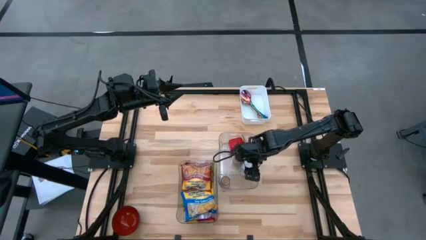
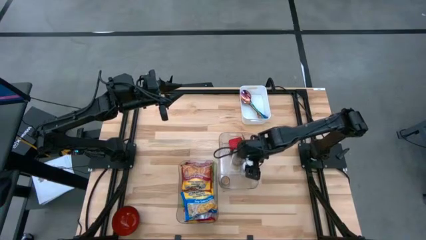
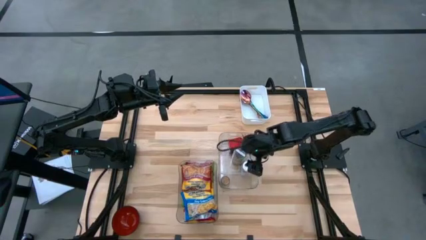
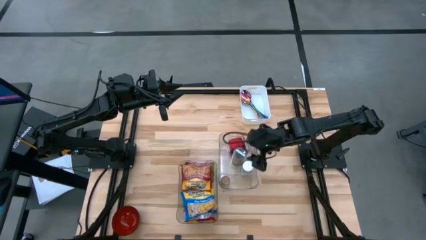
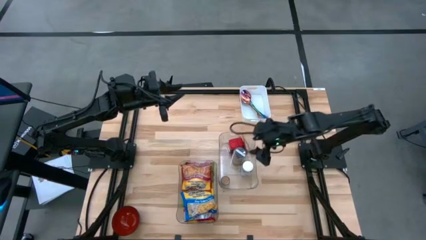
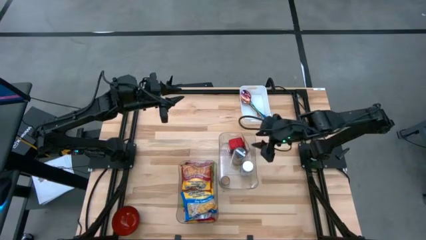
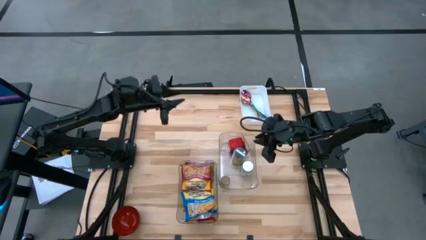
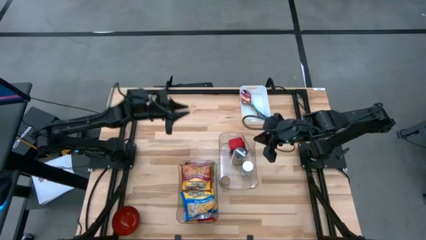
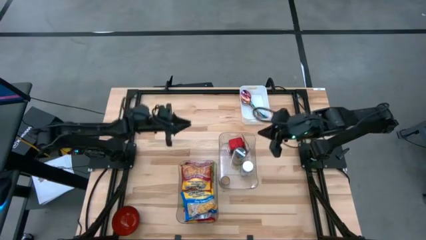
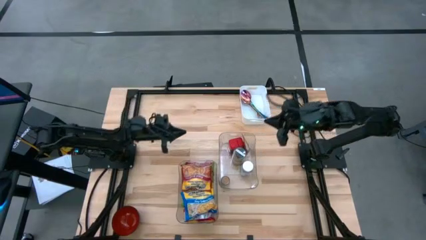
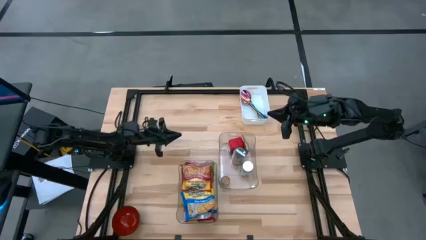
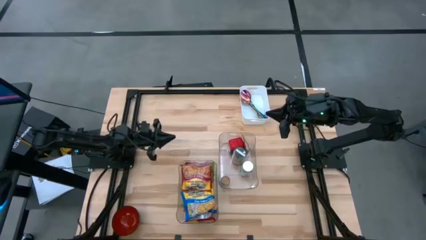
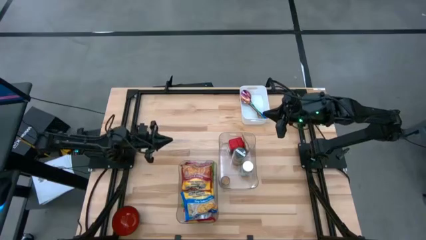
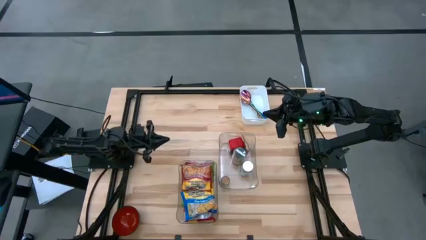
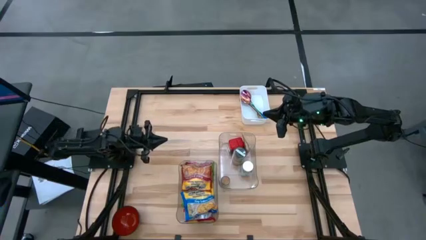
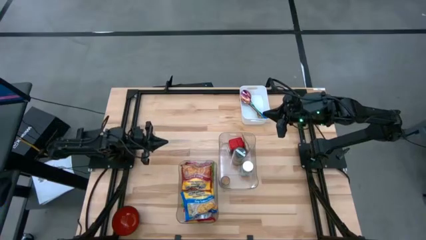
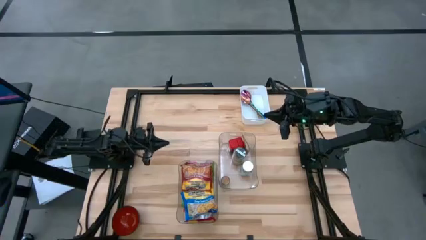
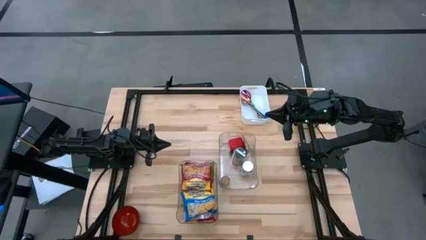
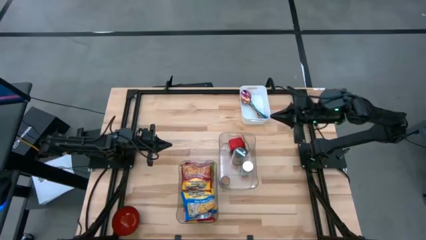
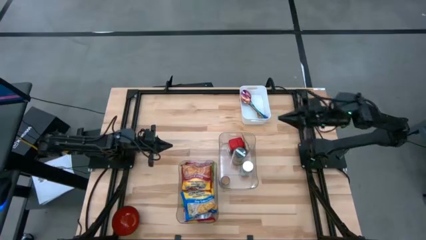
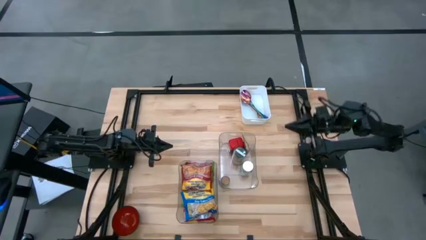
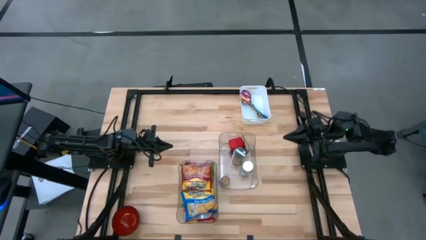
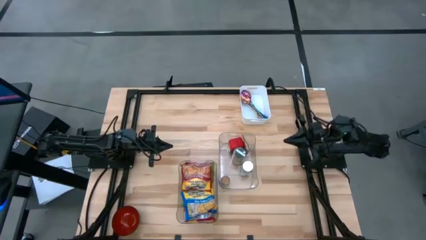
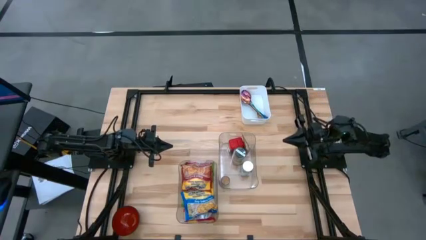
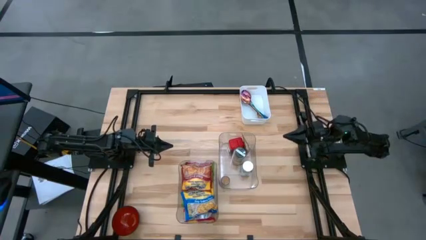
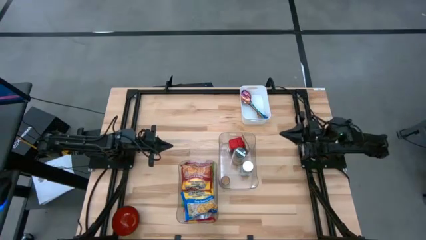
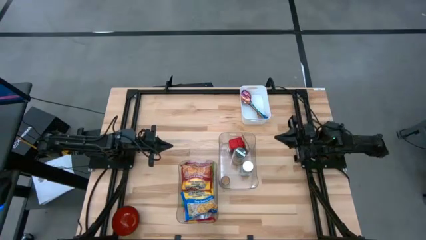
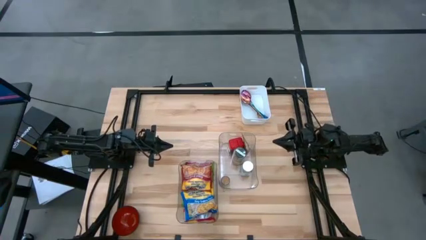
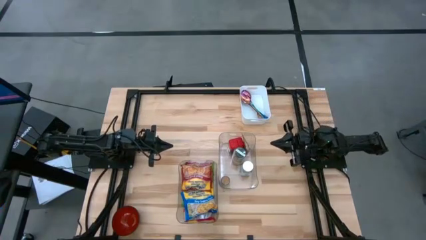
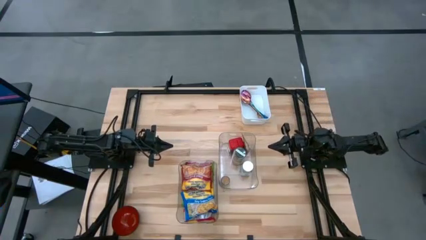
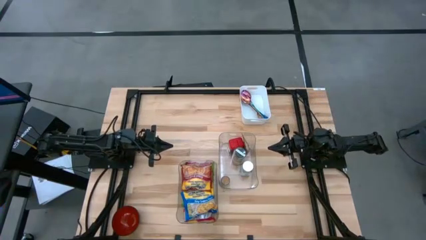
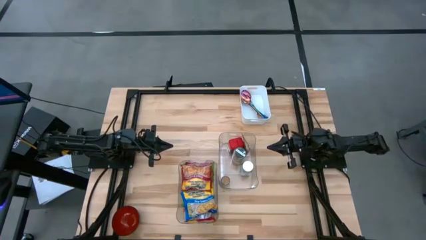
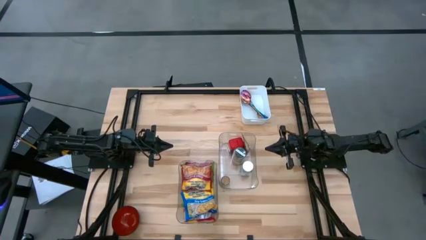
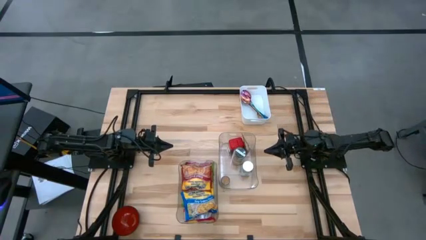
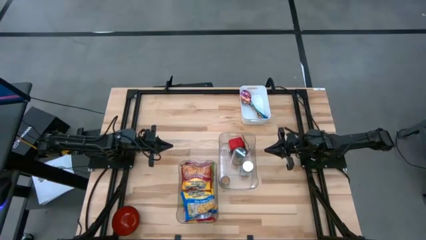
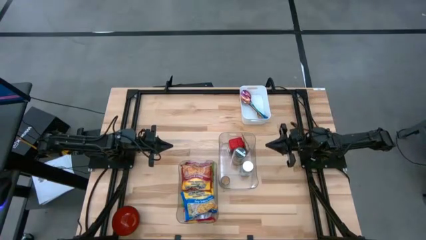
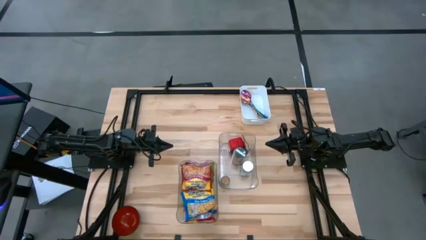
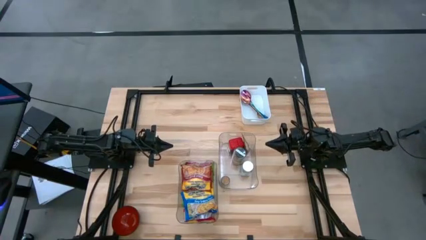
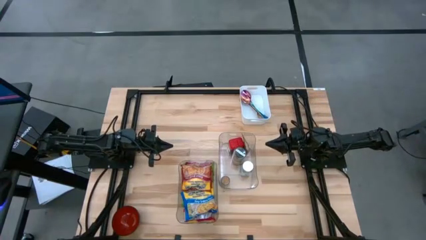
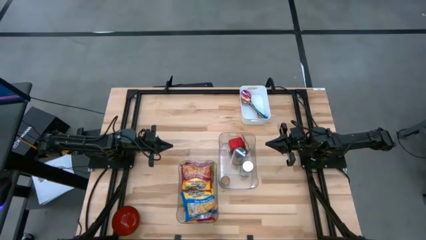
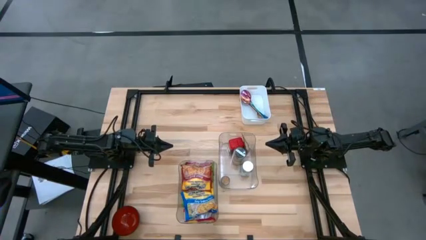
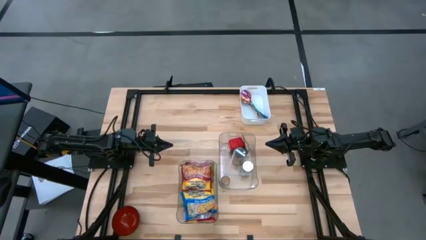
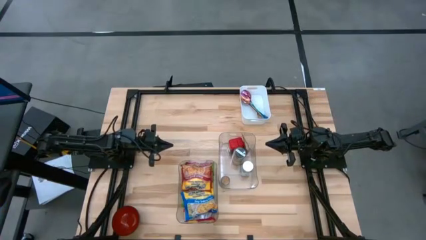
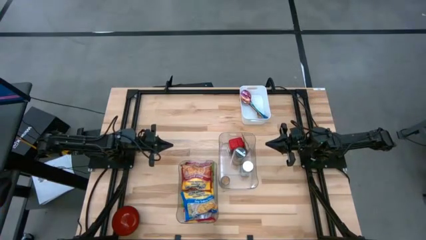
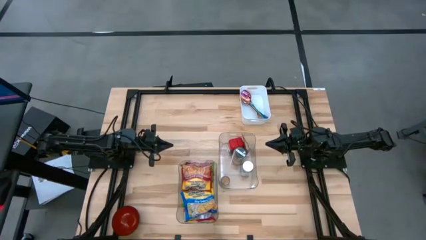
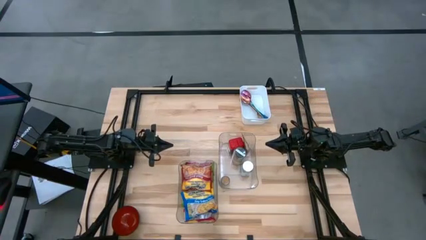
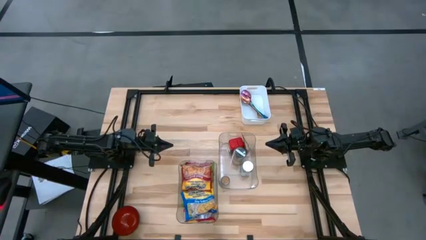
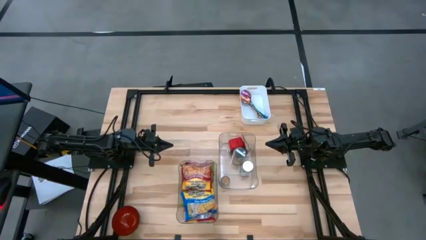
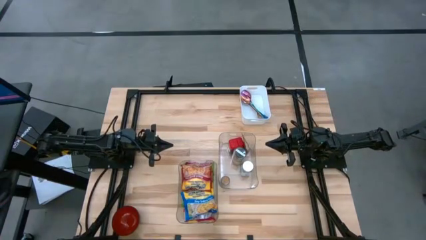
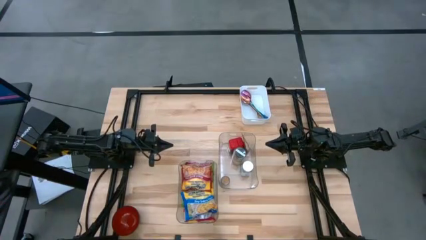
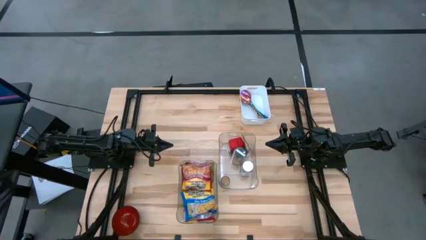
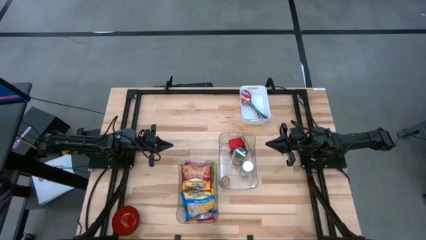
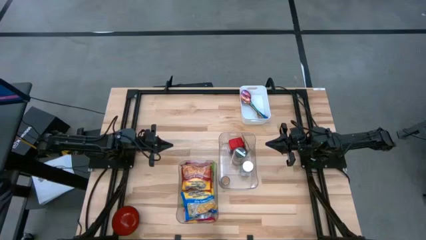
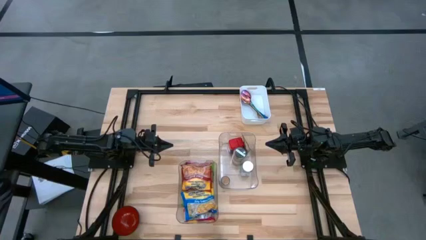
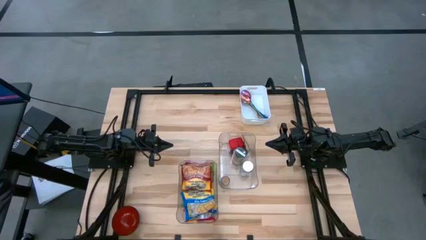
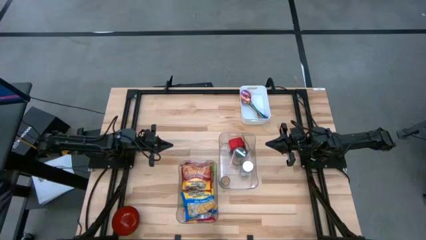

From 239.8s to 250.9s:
Task: Pick & Place Food Item
Return to Home Position

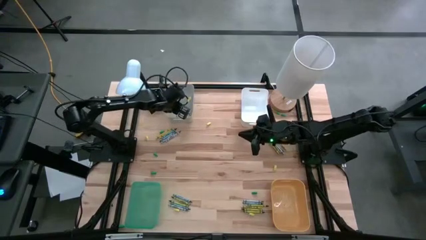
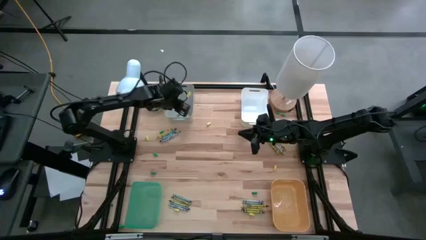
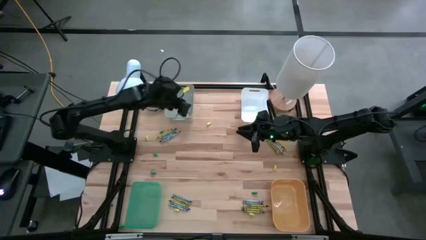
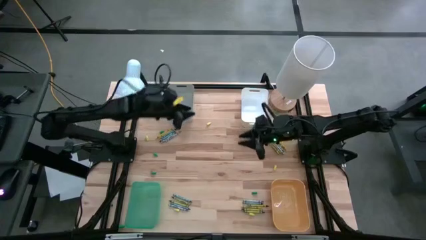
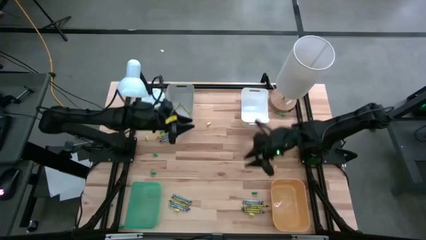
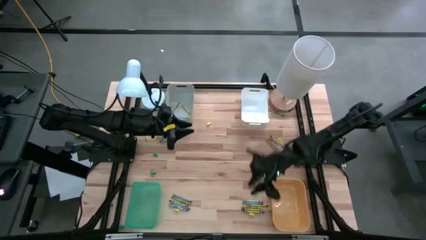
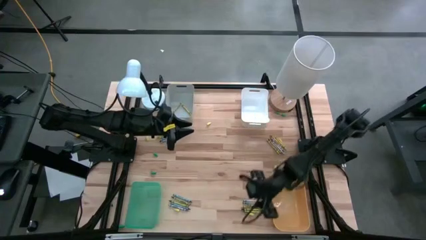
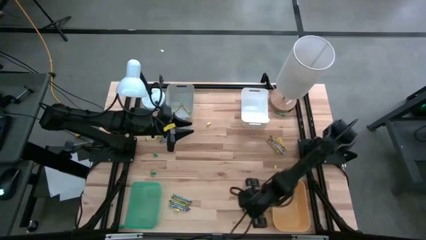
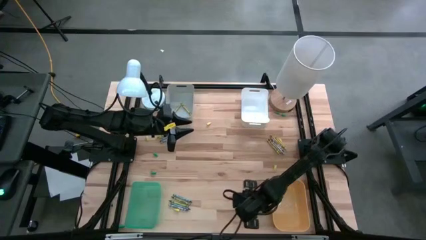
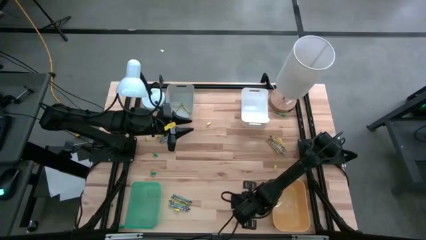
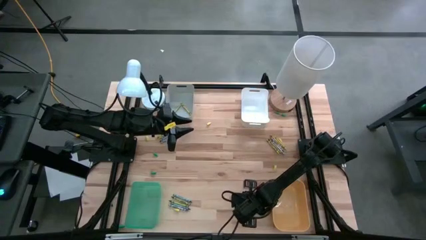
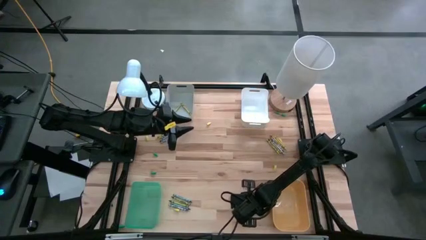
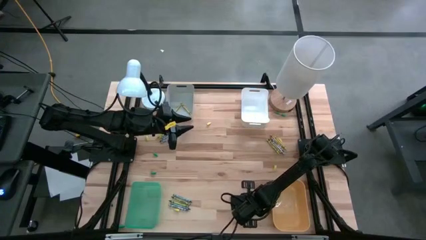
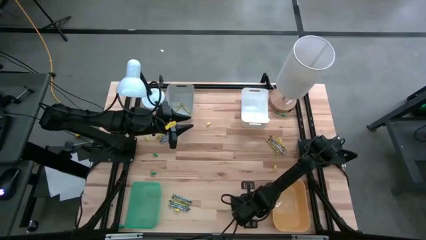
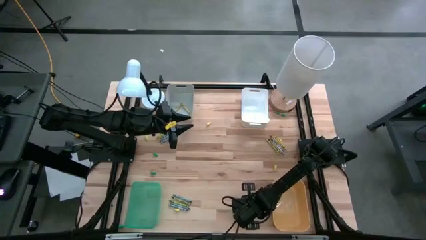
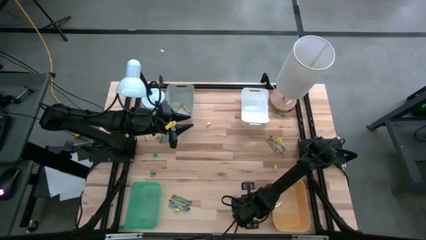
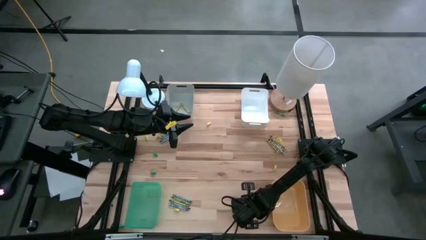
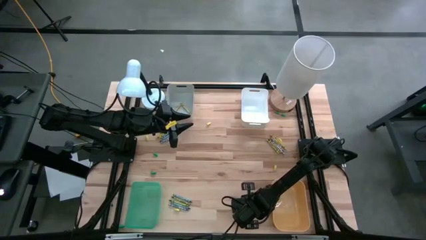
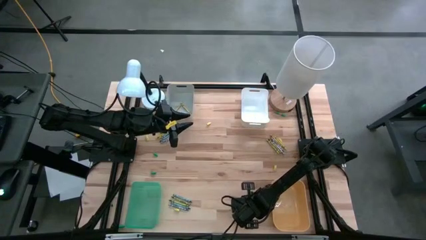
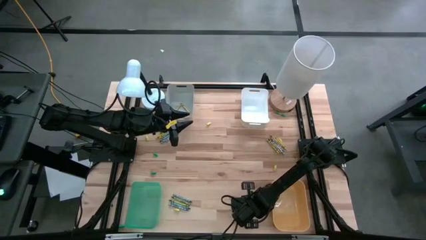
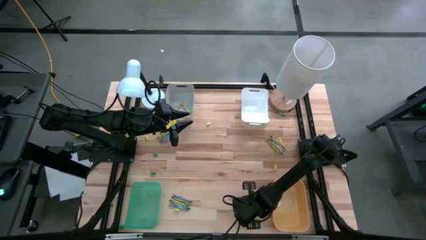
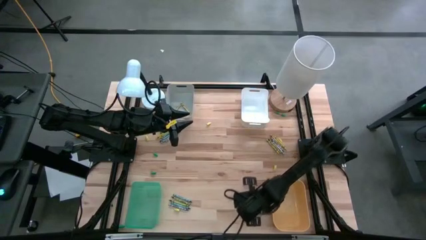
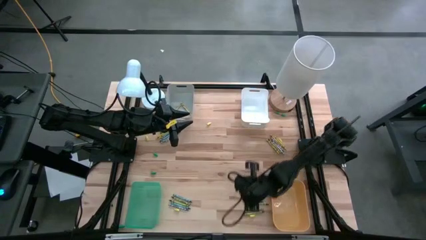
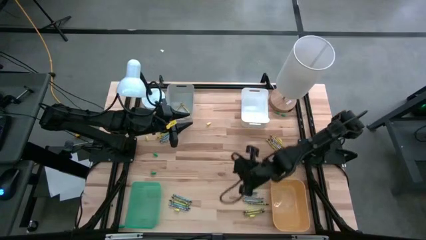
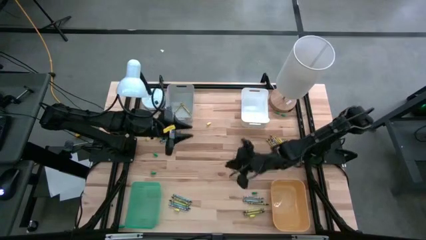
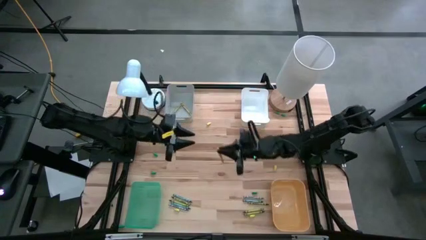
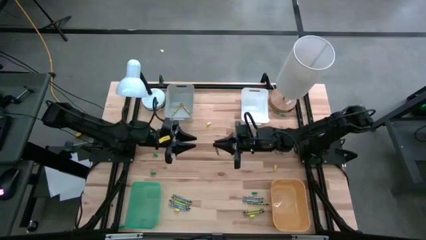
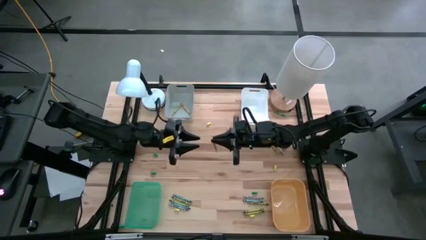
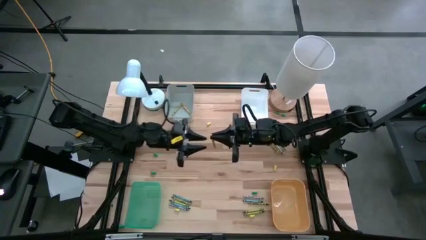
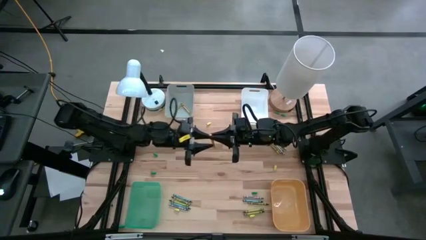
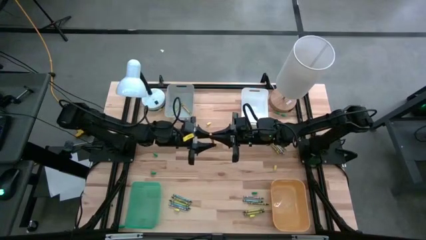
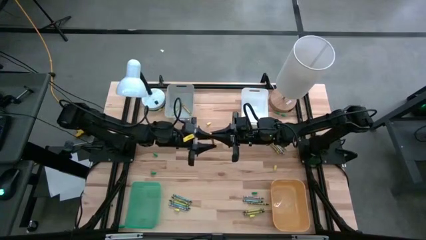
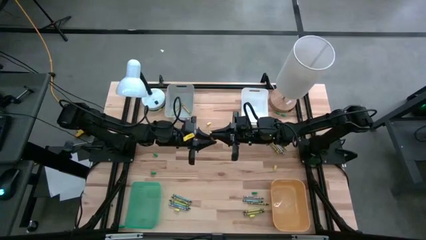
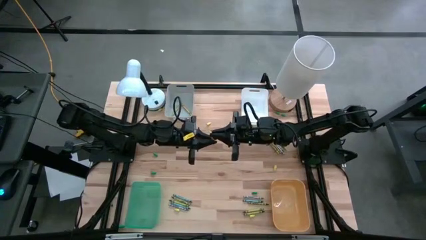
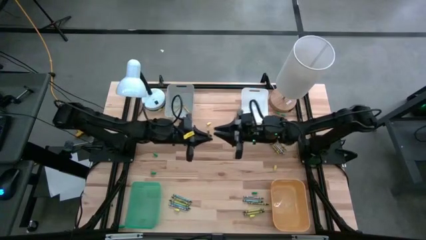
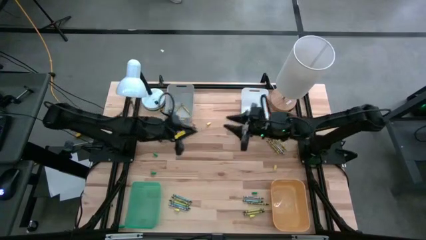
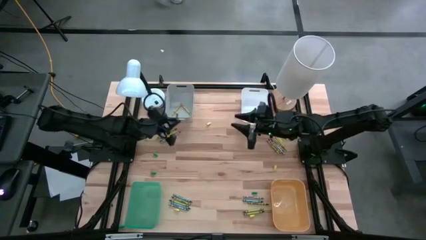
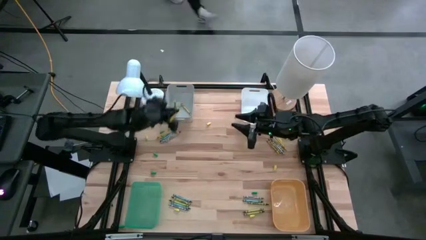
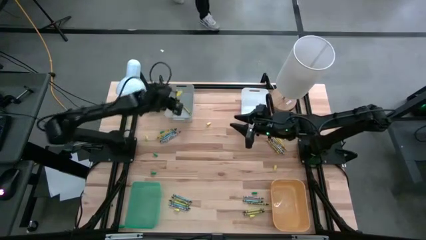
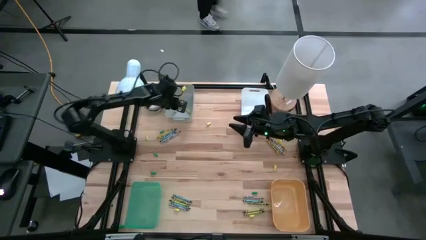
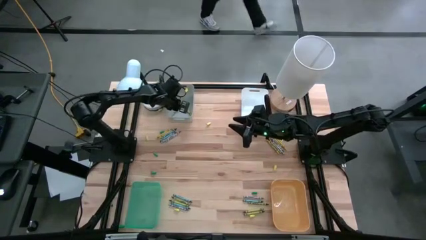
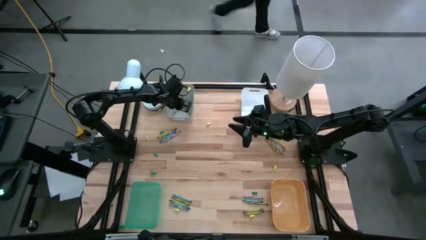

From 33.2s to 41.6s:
Task: Sort crayons
Put the yellow crayon into the gray bin
